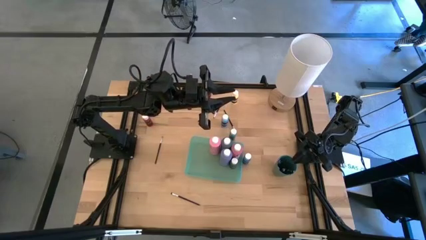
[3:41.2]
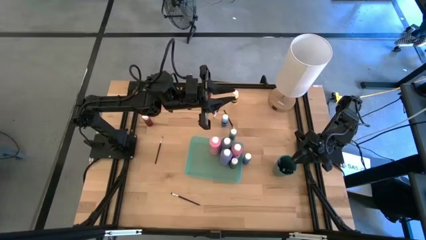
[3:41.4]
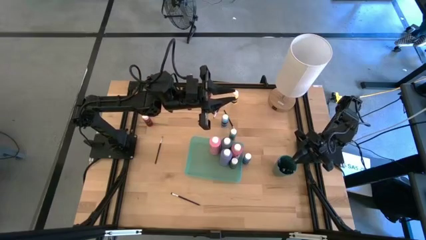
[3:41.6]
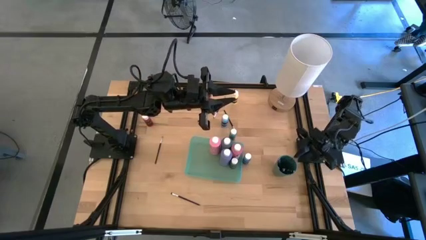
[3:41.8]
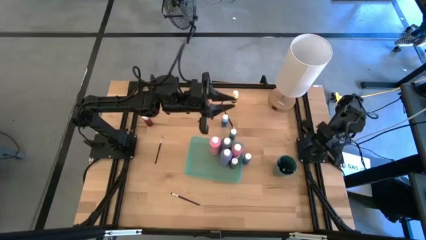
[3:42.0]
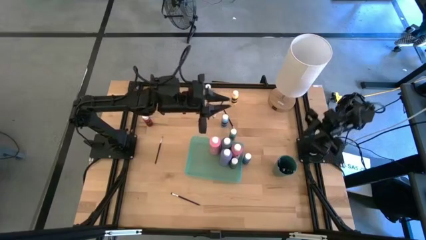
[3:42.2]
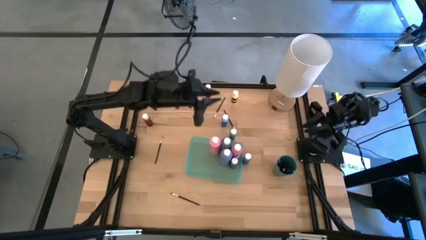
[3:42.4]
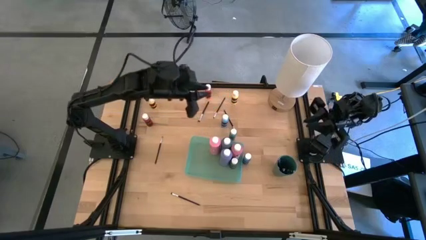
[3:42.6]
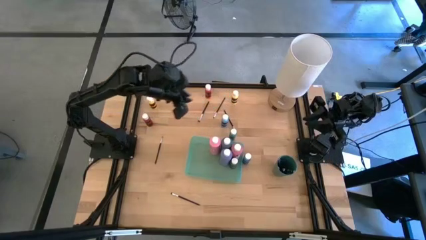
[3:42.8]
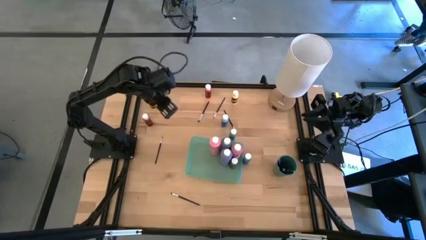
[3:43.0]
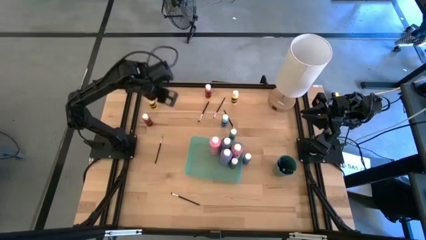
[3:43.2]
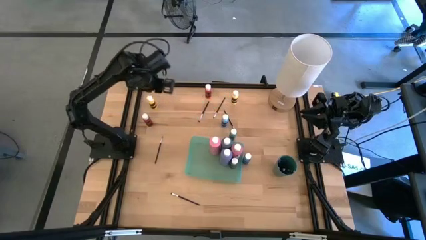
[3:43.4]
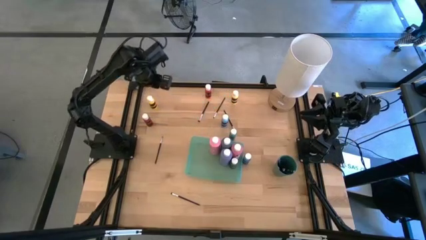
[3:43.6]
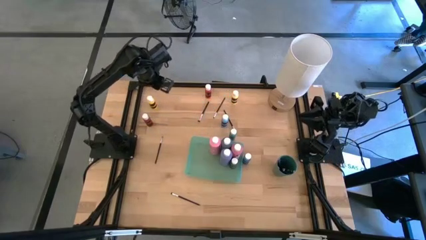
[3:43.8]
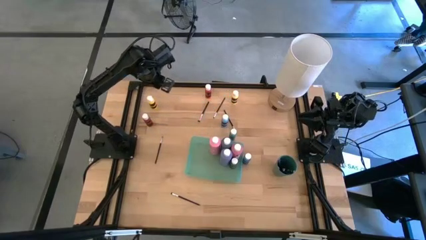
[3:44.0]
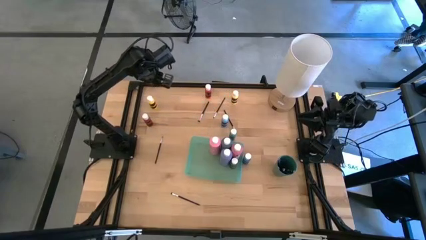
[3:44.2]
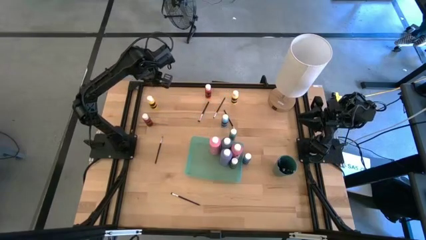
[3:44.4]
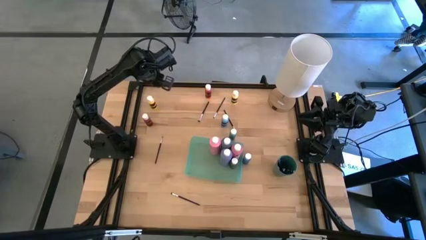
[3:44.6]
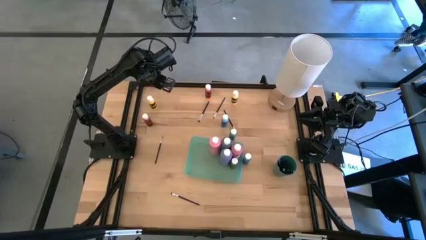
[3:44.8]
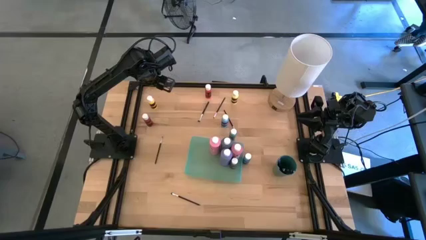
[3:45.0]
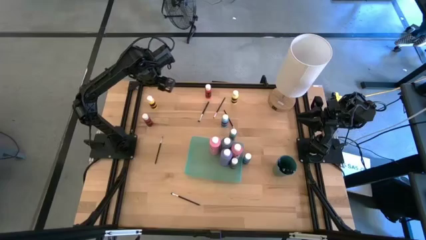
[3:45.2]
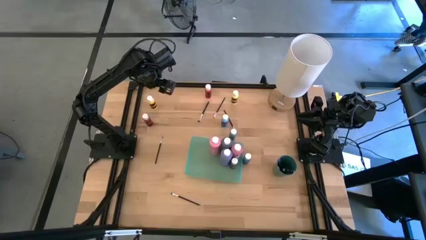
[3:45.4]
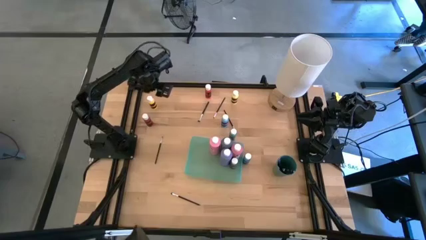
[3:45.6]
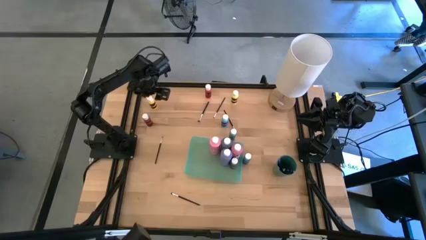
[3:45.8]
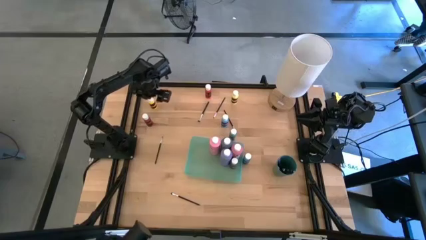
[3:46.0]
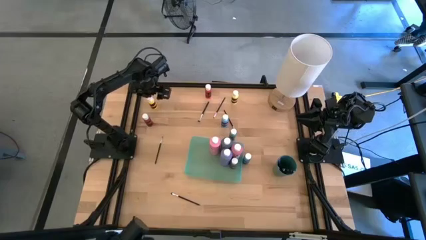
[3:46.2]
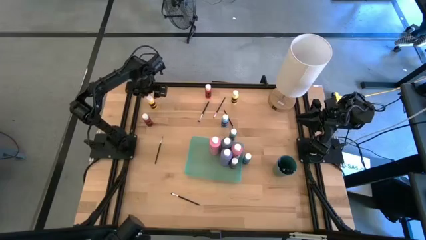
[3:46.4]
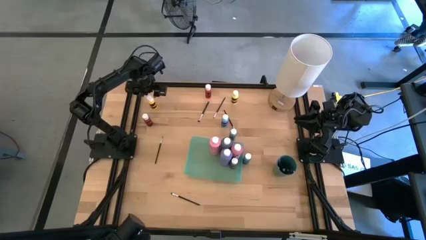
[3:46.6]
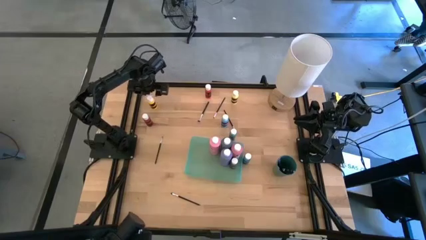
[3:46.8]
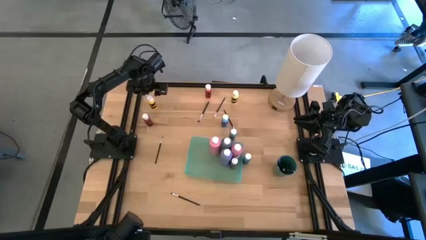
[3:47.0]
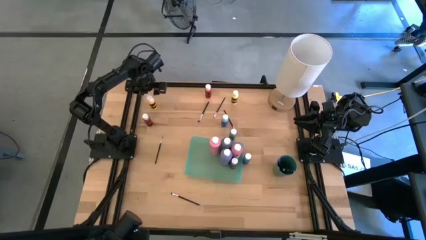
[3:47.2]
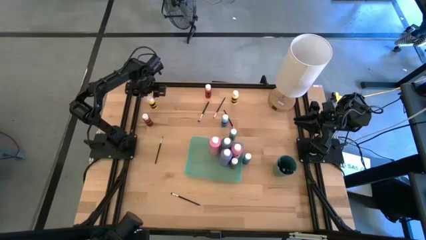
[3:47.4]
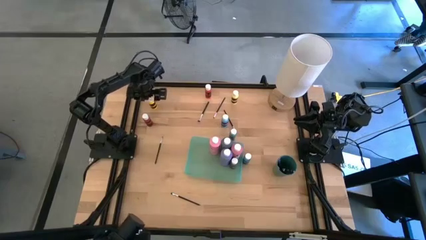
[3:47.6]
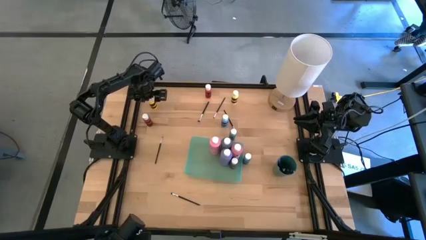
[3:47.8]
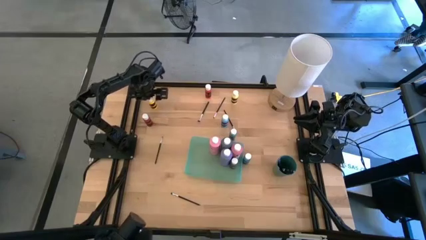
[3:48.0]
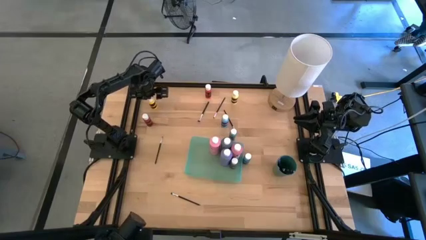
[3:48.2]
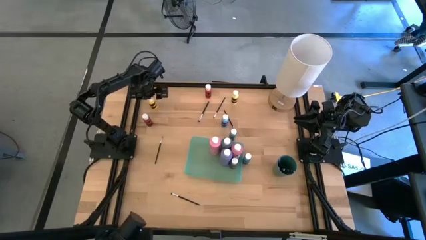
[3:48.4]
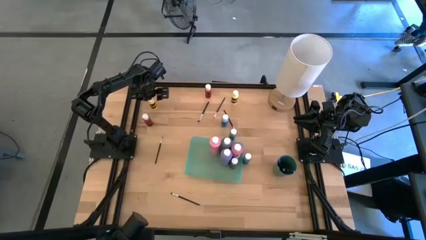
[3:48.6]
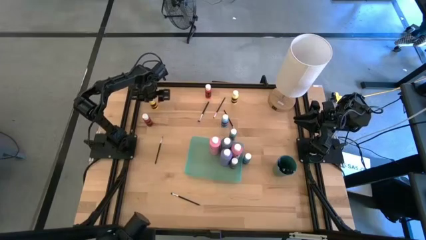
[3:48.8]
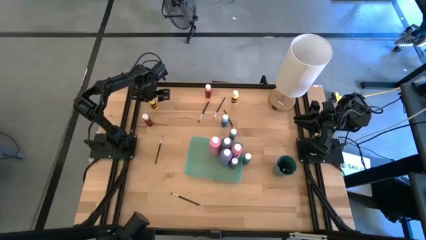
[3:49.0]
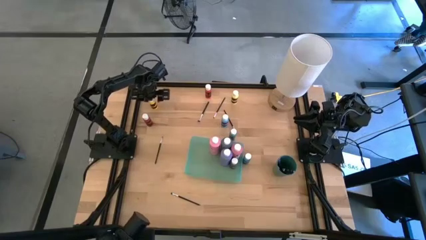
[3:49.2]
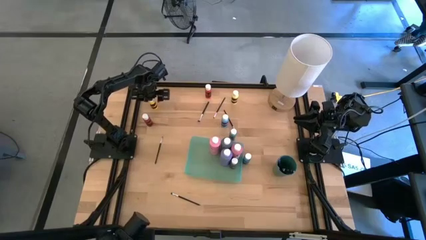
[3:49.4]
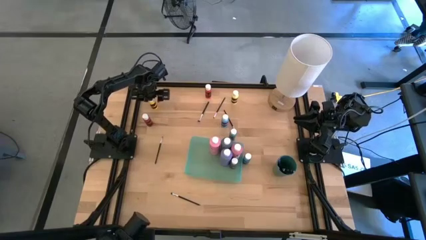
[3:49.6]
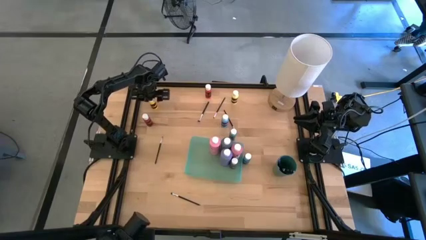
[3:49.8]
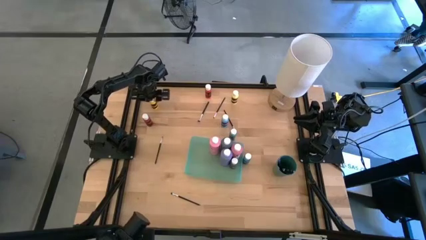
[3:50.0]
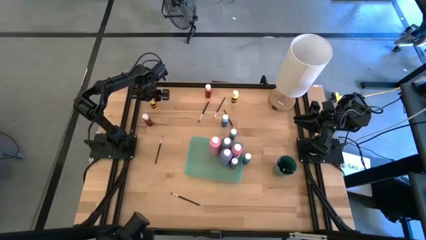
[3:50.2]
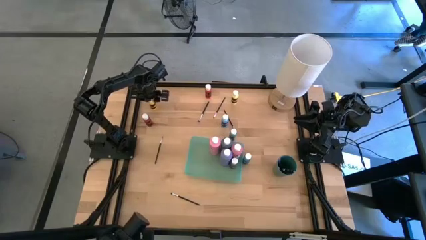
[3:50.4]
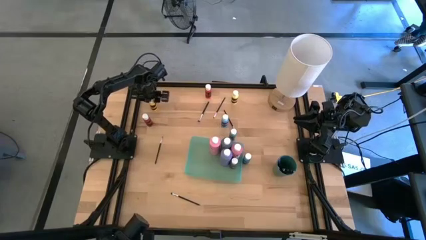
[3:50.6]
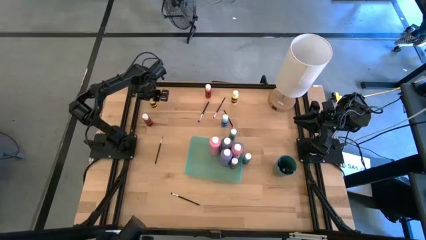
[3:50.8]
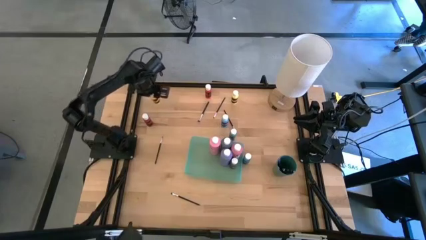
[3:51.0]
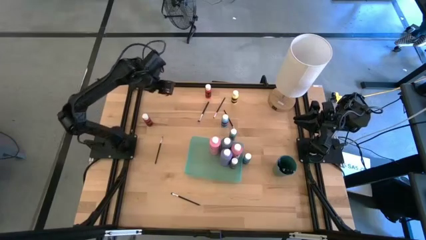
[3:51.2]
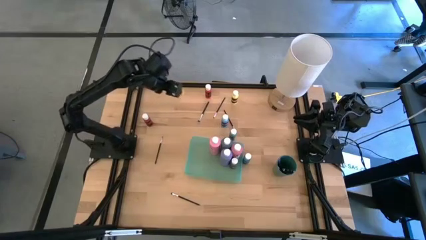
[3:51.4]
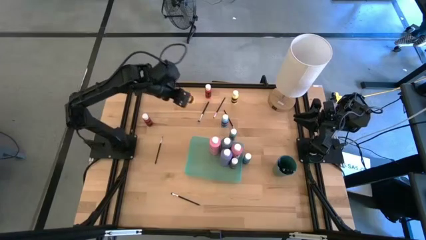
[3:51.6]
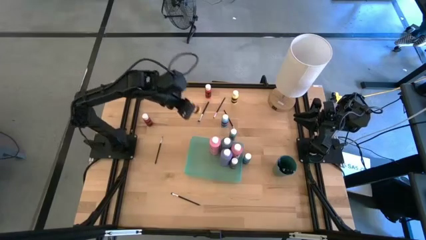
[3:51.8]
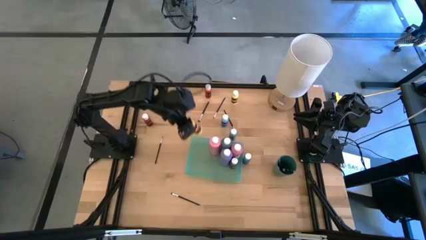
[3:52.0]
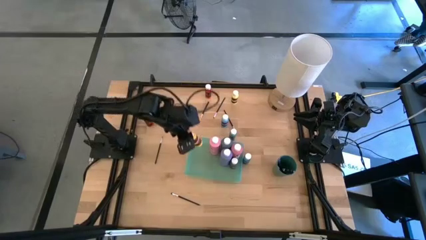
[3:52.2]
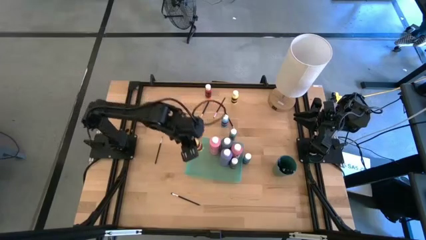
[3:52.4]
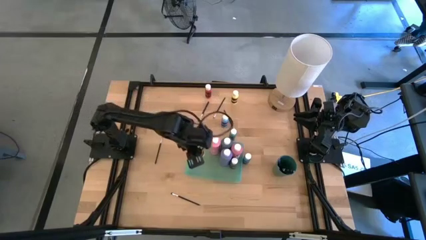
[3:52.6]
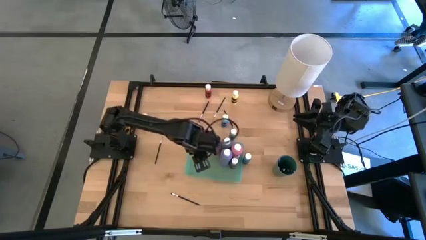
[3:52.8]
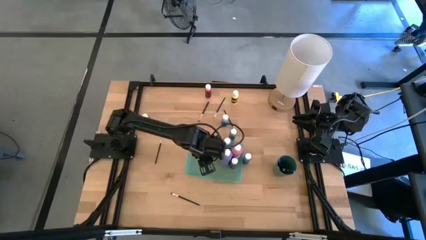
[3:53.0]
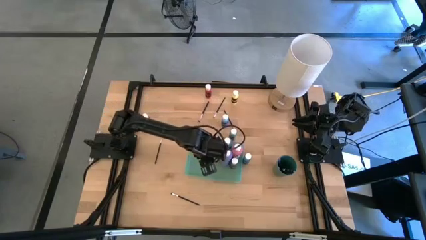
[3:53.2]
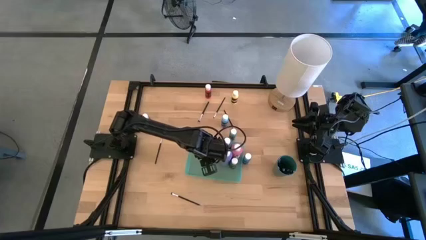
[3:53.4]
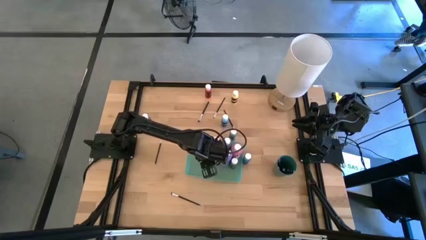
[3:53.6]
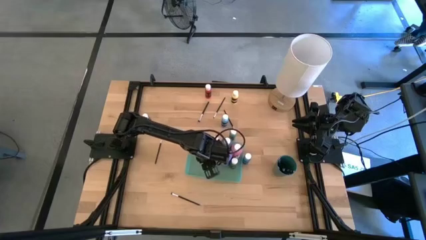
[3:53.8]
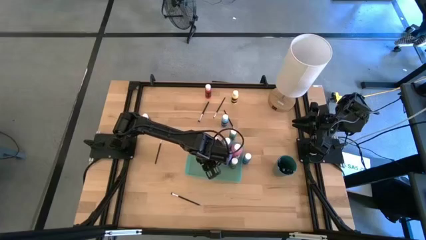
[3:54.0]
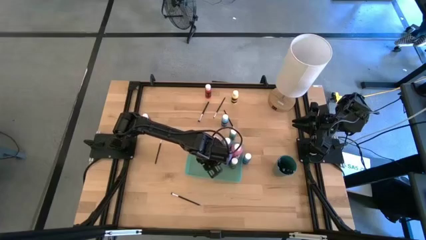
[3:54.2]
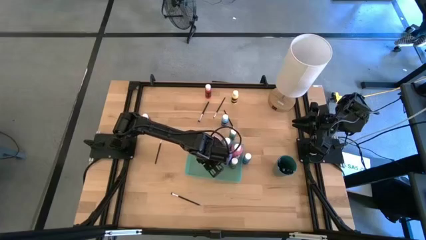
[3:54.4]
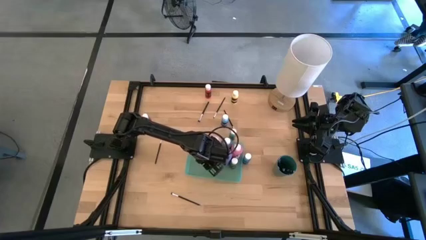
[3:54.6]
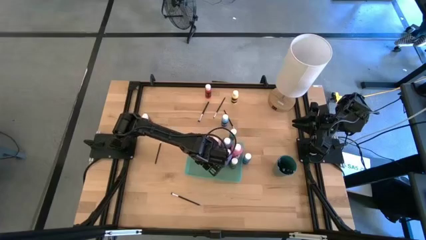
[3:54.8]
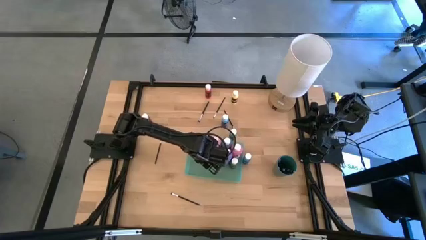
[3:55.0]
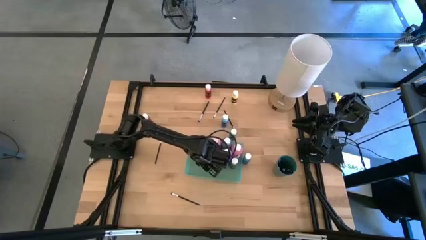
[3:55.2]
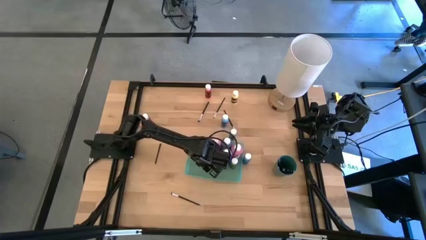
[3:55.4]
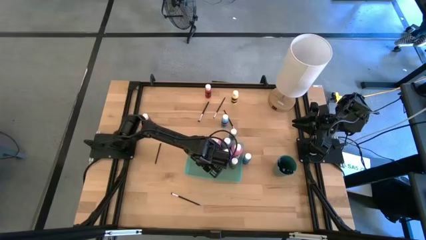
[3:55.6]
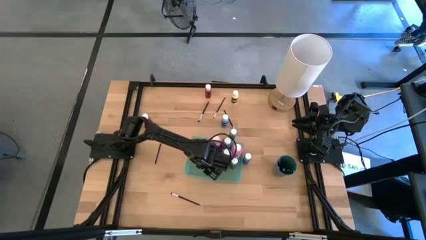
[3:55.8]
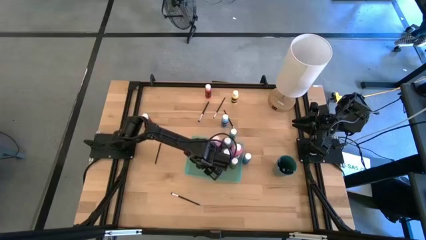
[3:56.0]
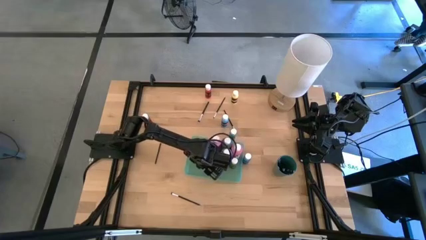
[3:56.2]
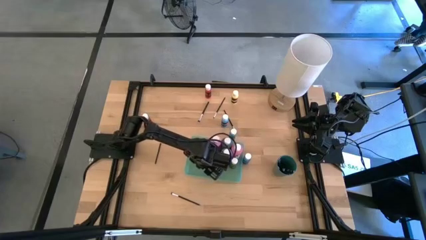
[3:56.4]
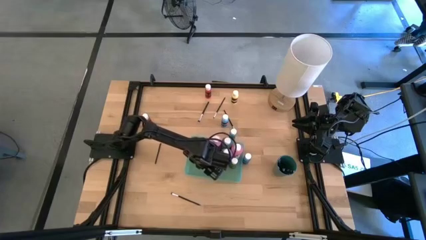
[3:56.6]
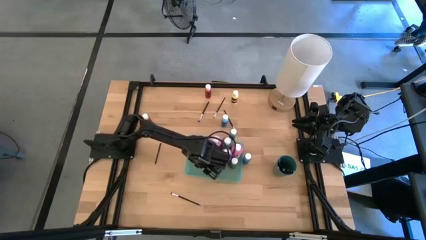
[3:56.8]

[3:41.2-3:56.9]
Task: Pick & Place Paint Supplies
Put the yellow paint bottle into the light green bin
